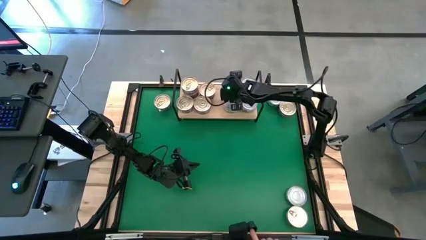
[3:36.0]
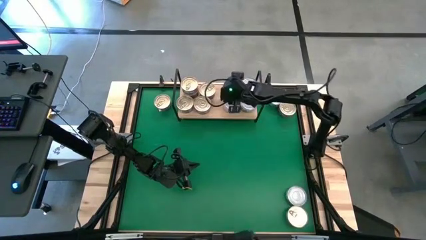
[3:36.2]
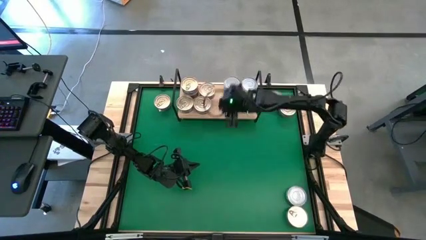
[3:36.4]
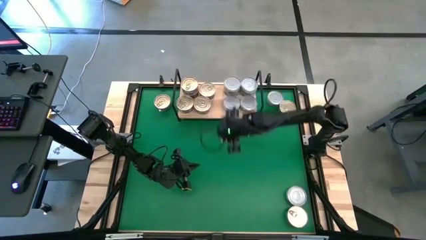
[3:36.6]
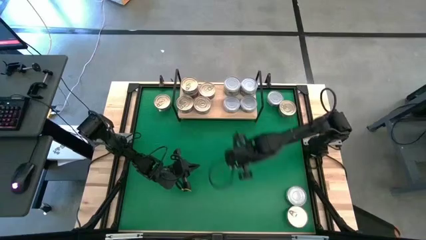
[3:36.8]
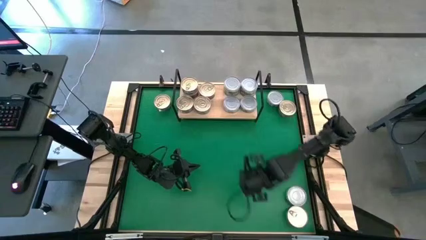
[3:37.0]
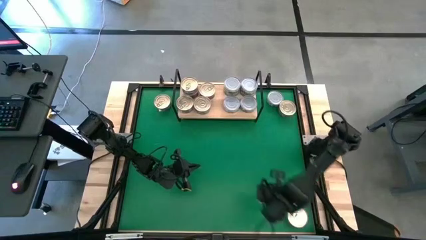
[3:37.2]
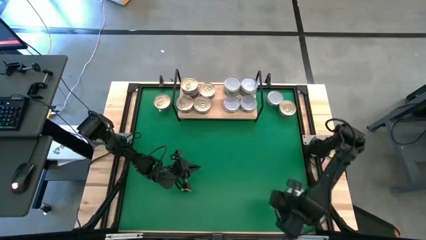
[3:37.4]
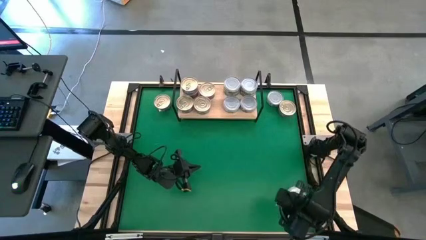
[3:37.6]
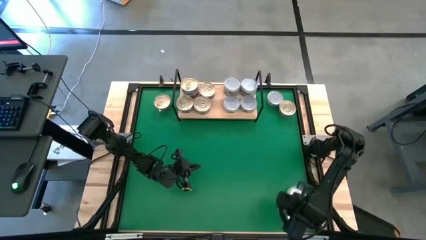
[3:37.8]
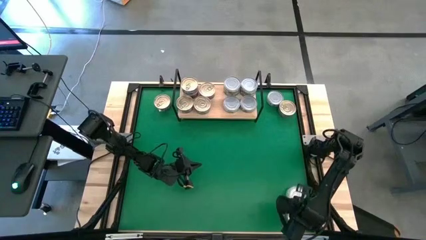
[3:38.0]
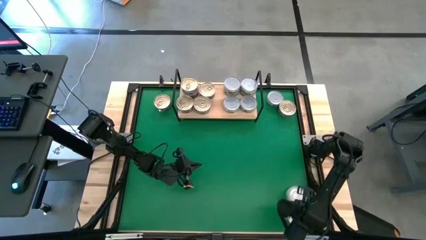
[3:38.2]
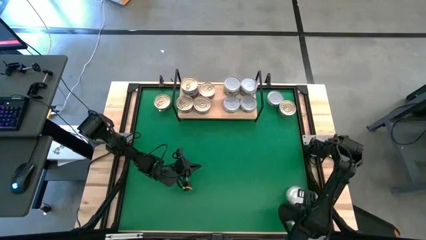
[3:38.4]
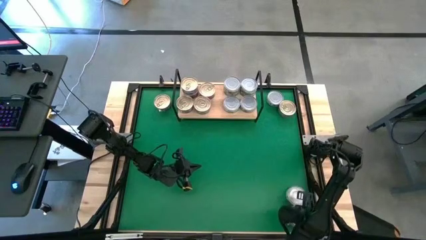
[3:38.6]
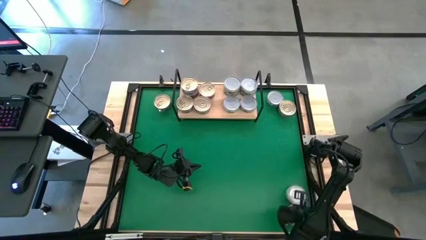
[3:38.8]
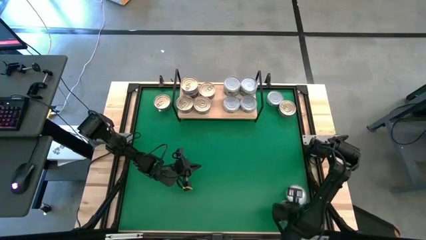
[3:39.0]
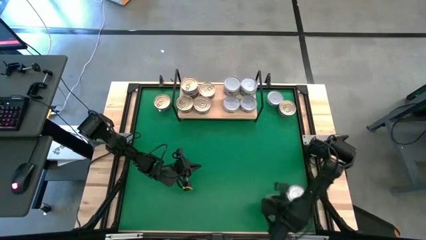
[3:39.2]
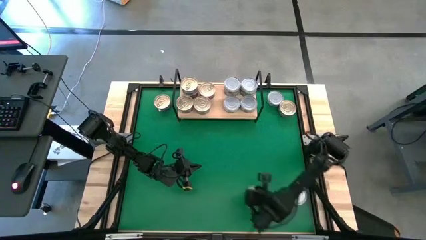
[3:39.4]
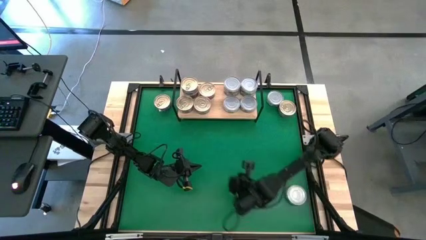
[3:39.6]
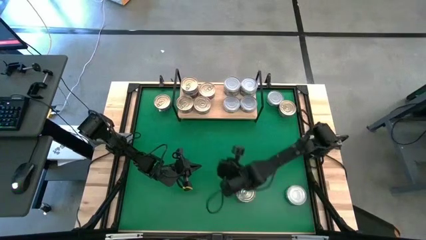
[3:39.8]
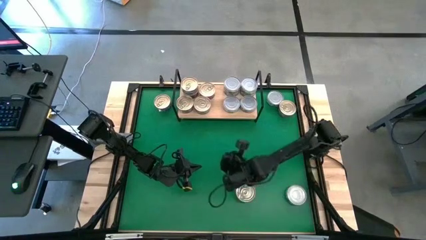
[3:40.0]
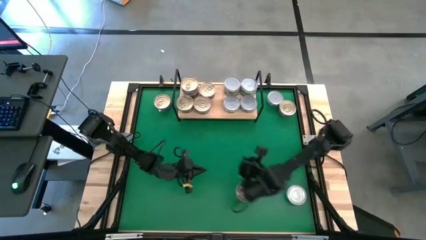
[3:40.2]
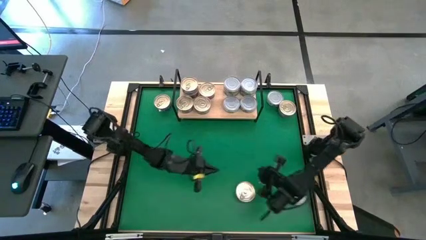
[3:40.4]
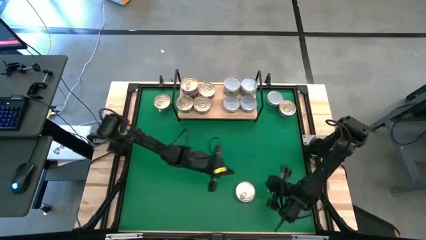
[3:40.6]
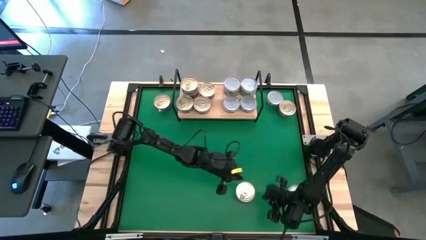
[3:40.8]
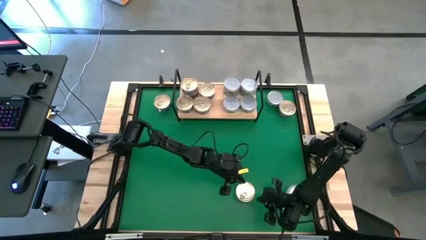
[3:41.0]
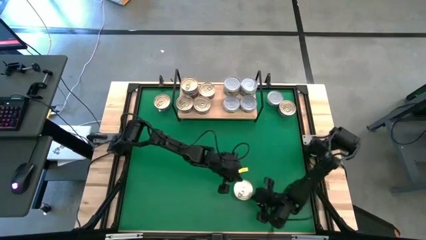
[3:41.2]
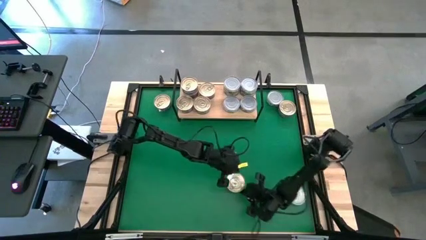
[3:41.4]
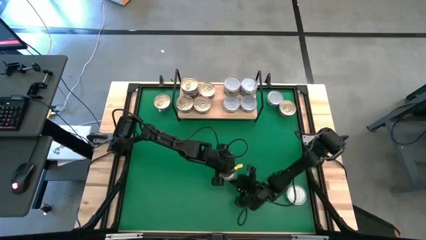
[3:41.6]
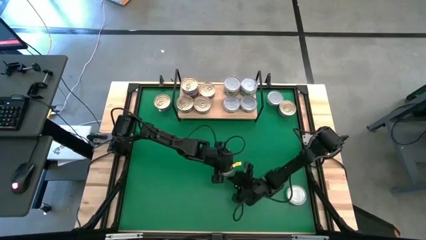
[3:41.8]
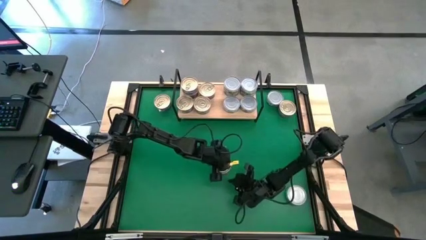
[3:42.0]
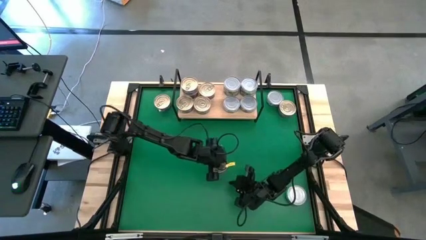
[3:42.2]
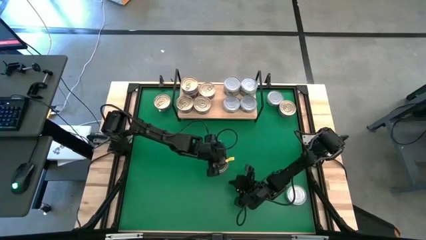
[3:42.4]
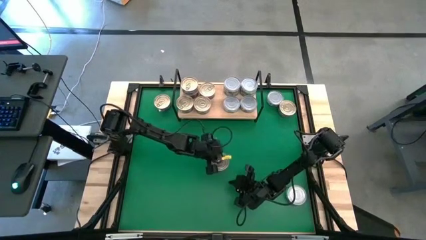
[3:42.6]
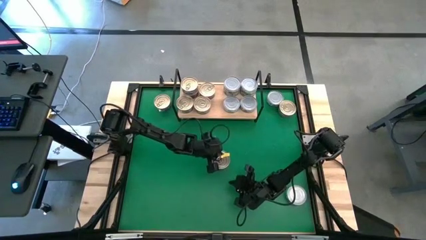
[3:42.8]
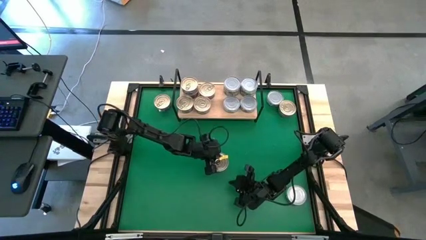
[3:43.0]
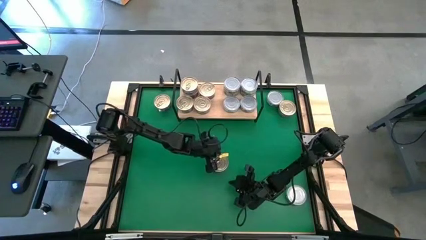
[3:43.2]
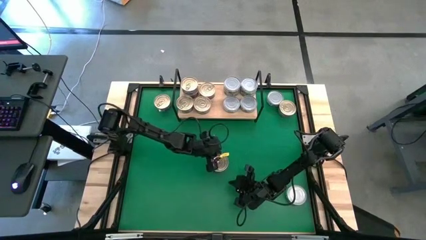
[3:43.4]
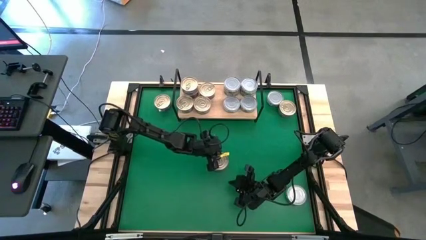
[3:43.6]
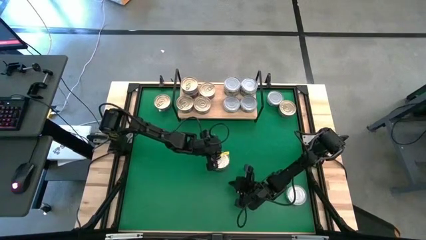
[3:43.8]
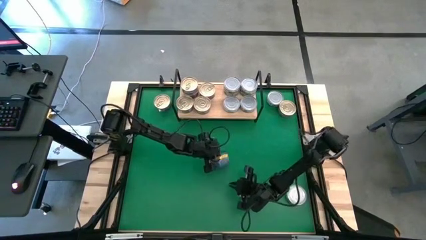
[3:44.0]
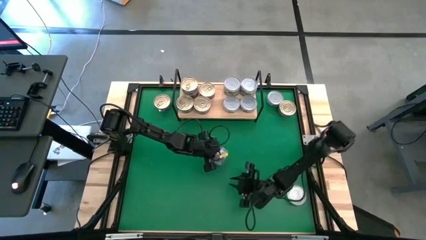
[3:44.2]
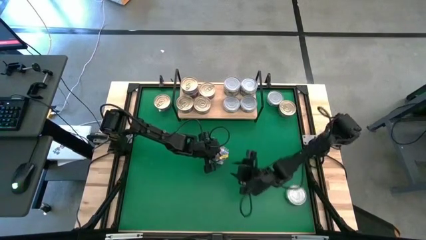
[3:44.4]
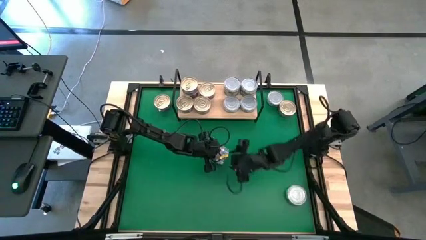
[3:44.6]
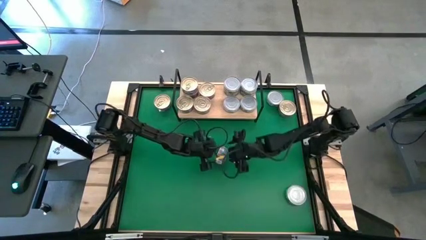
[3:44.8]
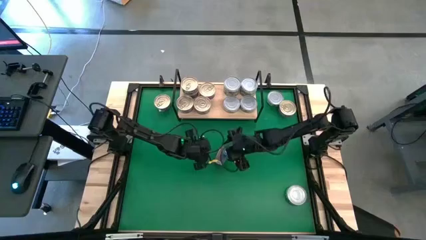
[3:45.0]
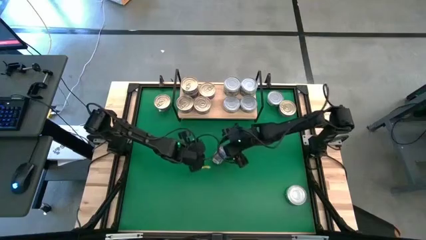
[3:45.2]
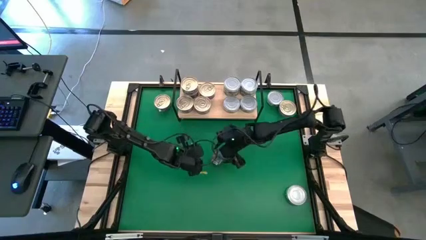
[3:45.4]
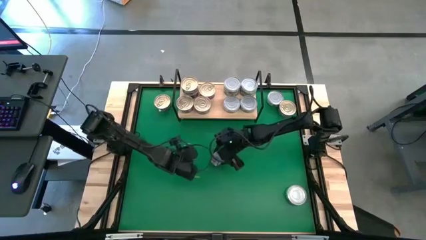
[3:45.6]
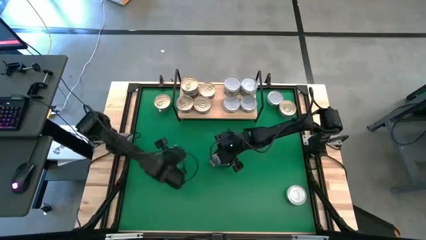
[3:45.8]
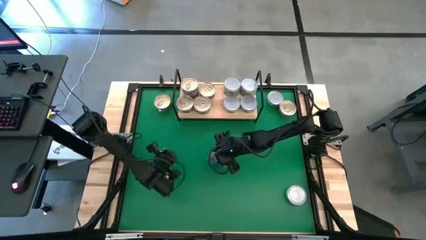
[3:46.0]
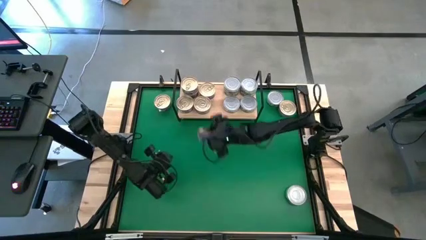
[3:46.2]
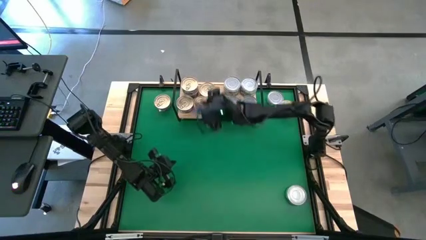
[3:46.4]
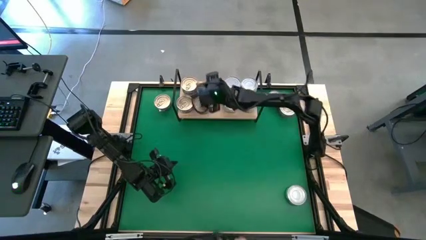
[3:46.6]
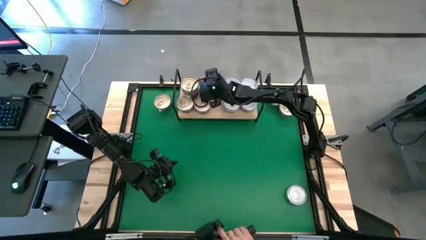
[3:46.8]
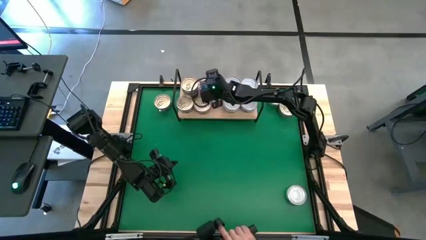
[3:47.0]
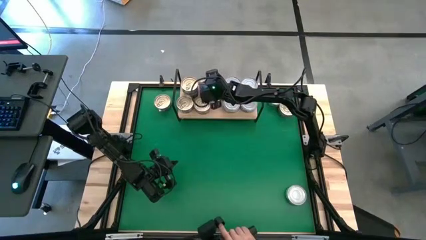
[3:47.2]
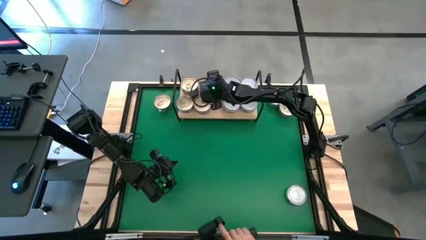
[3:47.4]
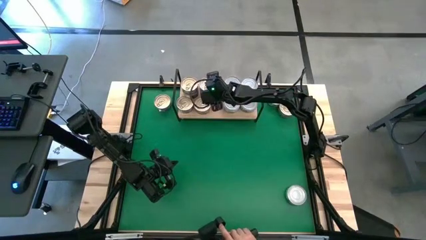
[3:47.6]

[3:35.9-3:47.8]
Task: Stack canned seafood by type on shelf
Stack the blue pink tuna can on top of the other blue pink tuna can on the shelf

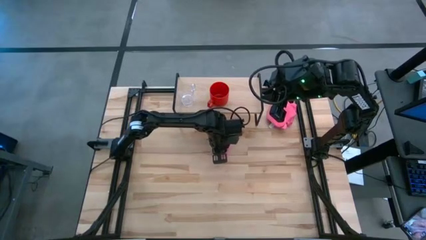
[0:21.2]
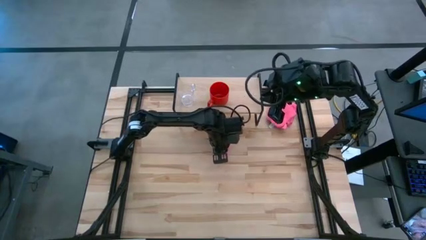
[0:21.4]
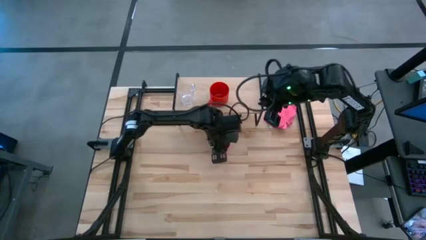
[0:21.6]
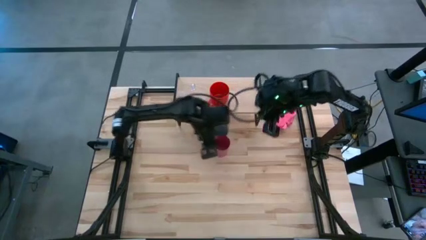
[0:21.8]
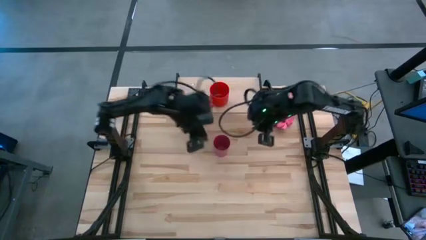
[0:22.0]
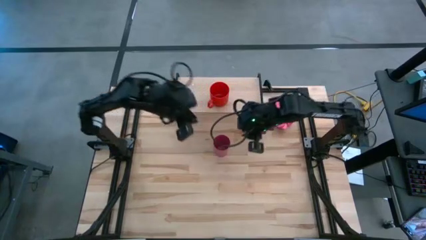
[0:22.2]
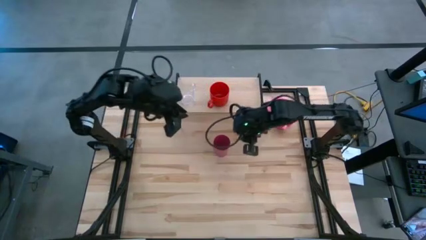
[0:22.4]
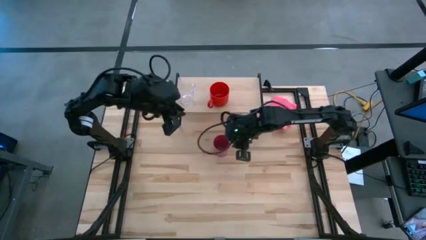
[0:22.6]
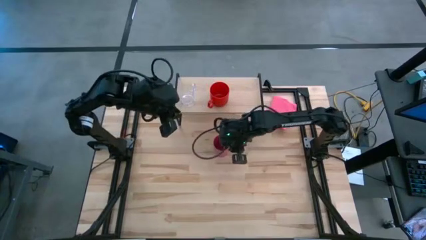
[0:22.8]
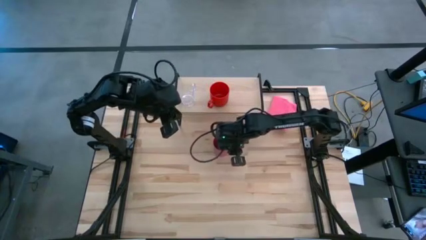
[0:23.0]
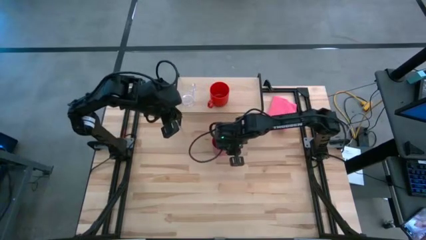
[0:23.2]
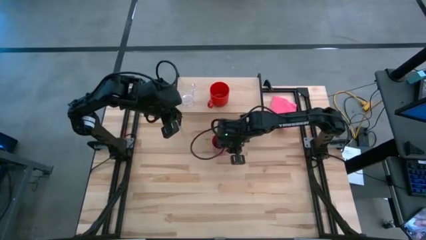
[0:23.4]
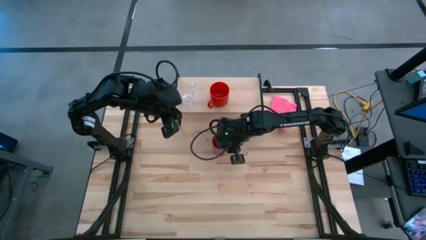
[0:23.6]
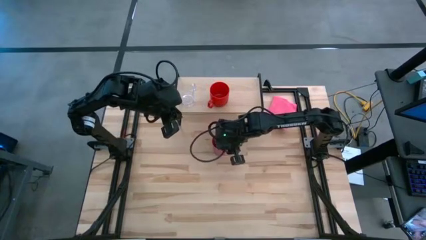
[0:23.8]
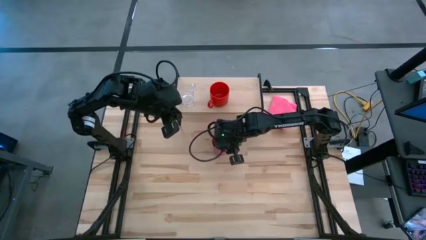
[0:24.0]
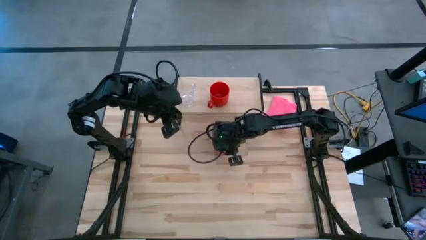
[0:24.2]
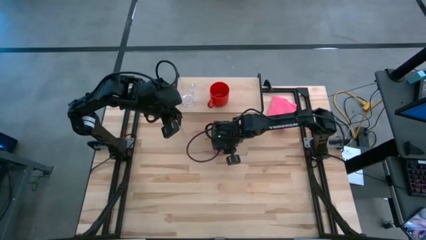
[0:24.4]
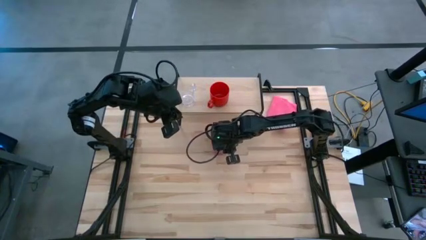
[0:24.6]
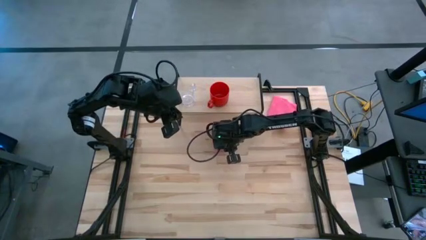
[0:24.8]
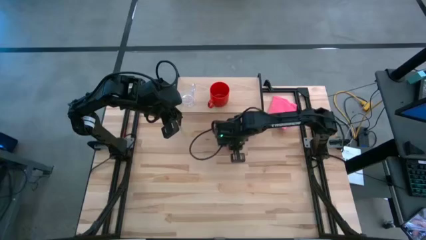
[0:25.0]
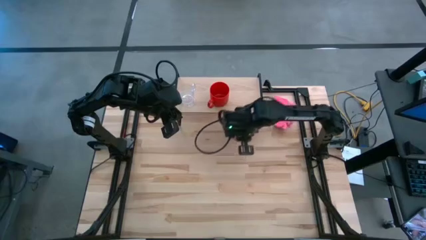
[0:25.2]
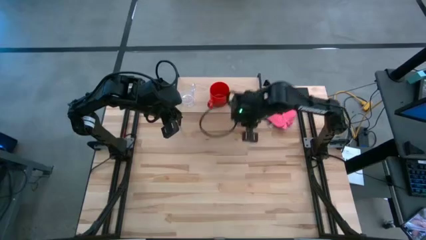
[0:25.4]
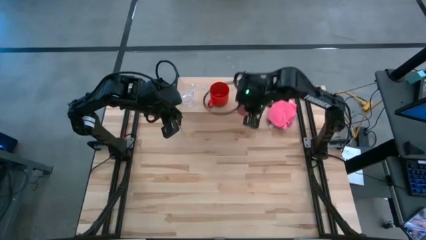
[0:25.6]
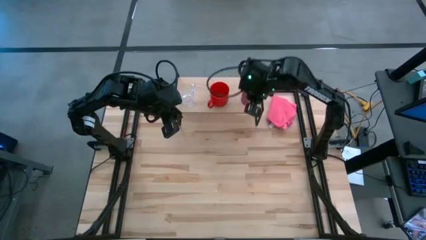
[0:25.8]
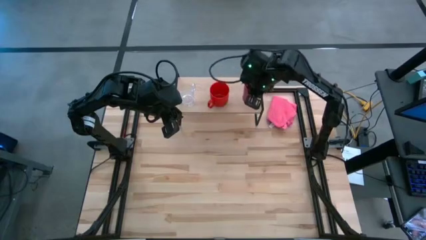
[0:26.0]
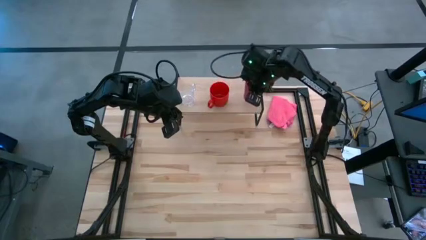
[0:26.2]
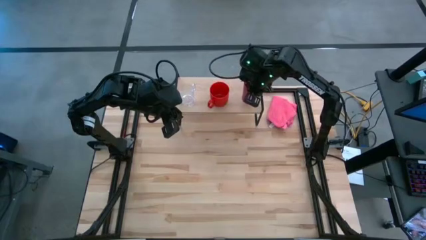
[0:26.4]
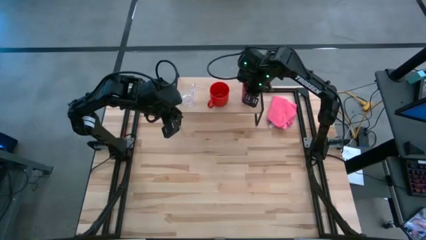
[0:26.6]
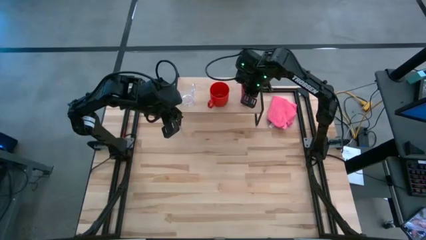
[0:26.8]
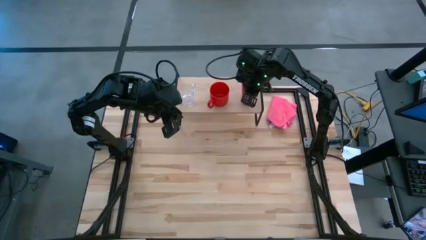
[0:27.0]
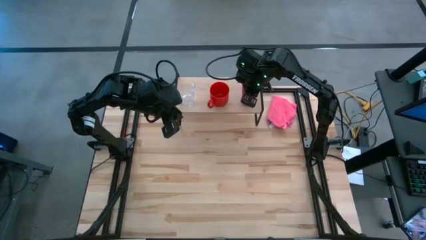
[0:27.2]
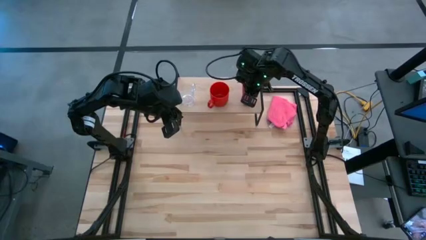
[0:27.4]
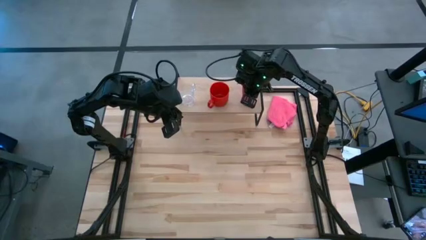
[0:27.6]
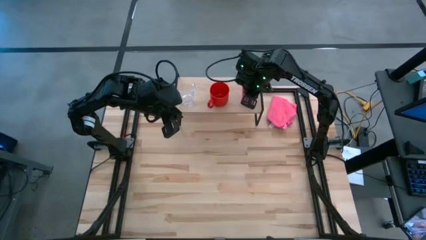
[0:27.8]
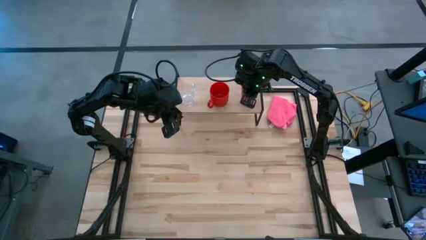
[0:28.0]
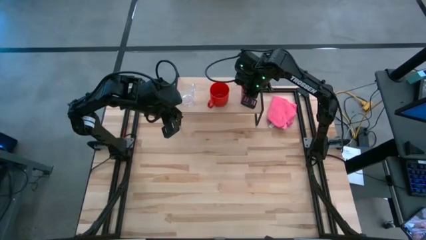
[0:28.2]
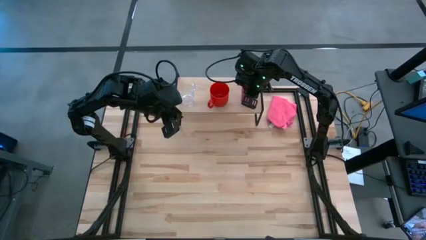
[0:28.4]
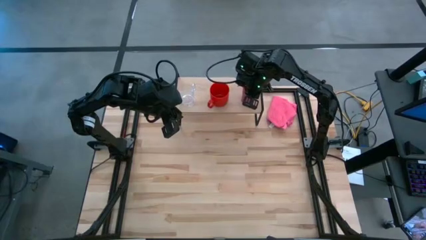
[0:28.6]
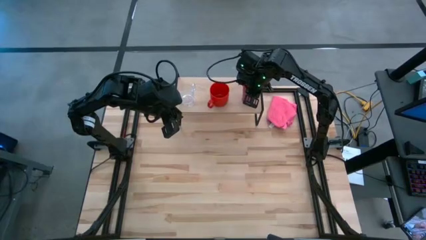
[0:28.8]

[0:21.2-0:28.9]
Task: Stack small to large cups/mugs on shelf
Put the pink cup on the shelf
